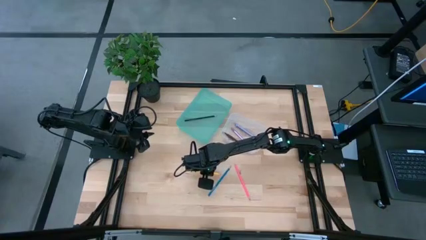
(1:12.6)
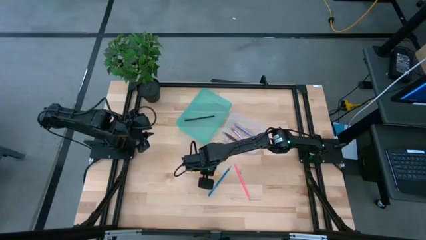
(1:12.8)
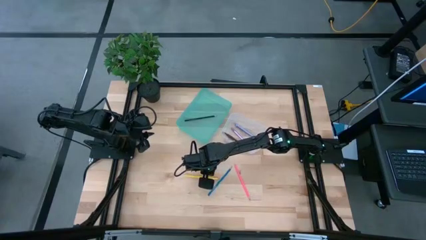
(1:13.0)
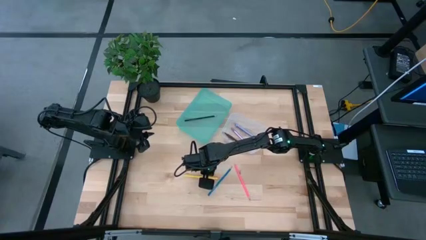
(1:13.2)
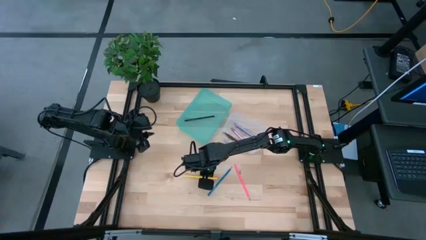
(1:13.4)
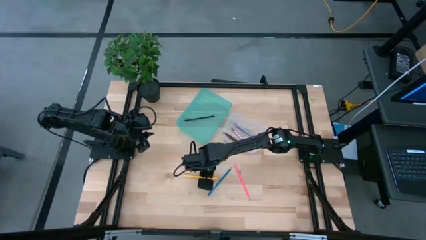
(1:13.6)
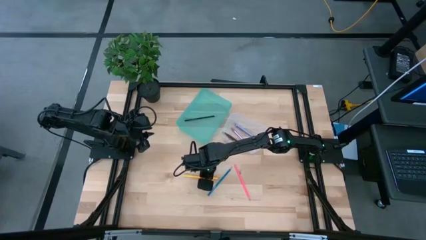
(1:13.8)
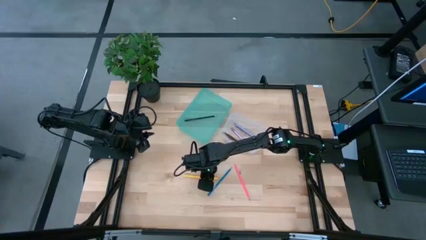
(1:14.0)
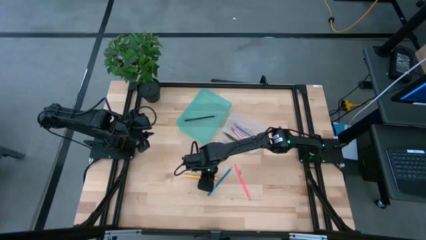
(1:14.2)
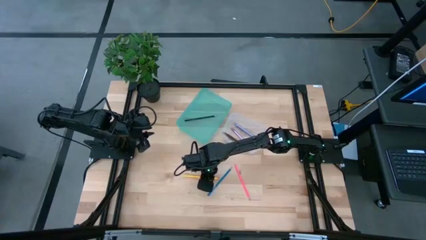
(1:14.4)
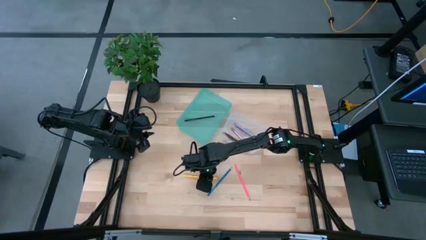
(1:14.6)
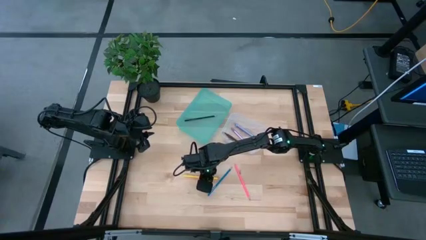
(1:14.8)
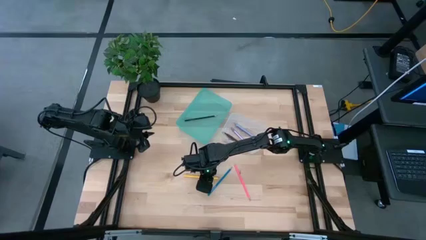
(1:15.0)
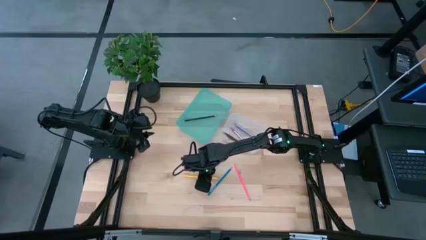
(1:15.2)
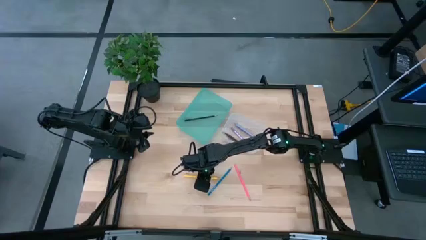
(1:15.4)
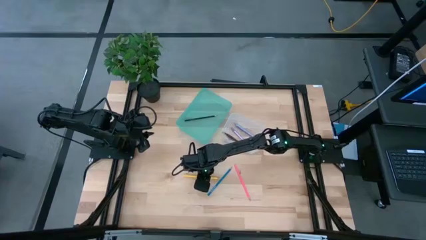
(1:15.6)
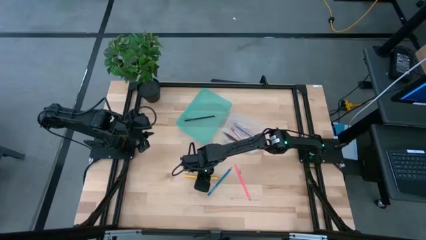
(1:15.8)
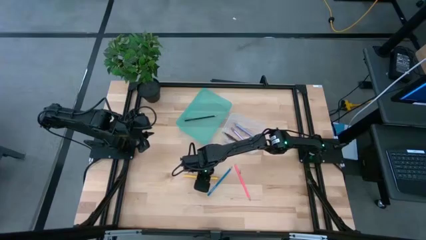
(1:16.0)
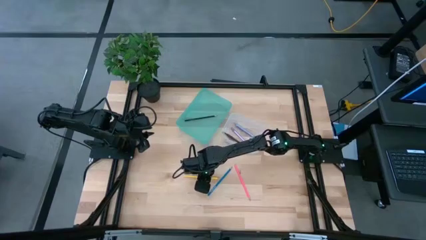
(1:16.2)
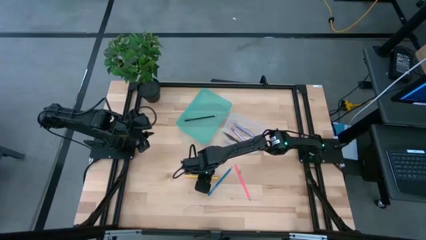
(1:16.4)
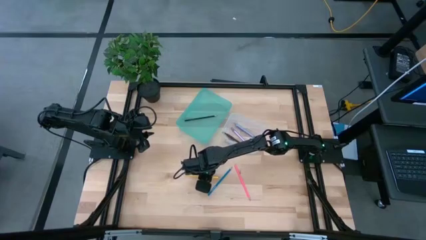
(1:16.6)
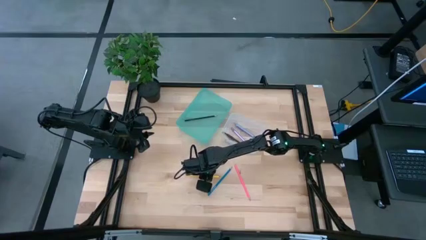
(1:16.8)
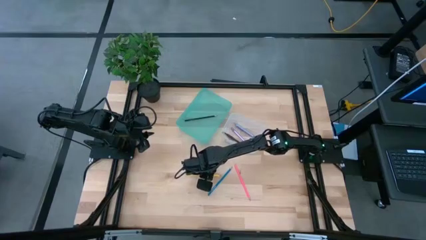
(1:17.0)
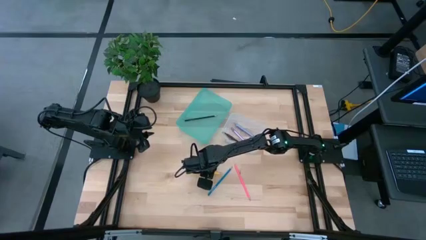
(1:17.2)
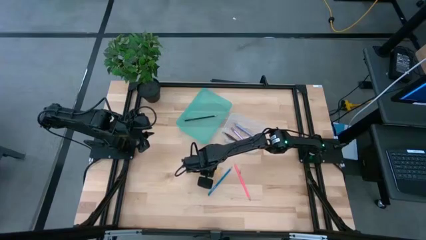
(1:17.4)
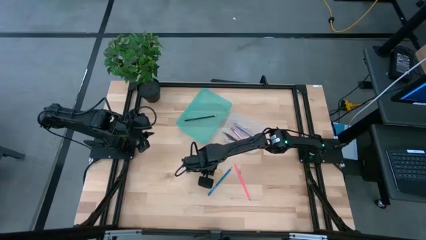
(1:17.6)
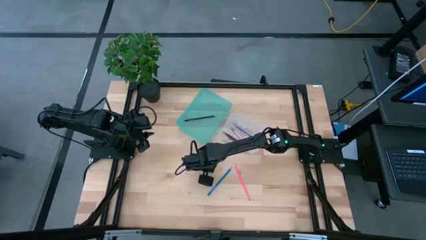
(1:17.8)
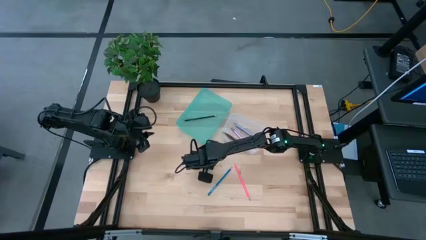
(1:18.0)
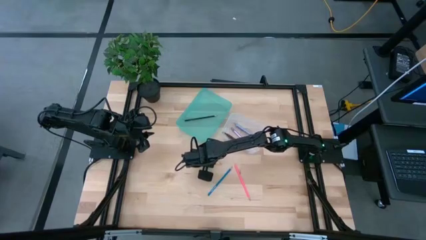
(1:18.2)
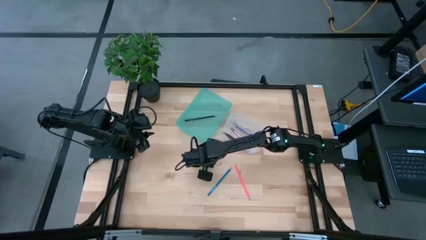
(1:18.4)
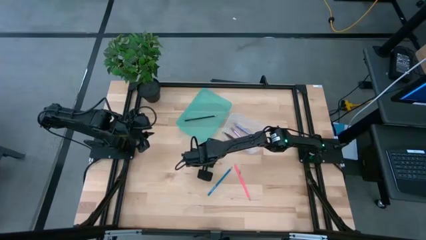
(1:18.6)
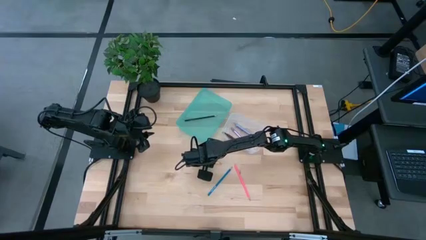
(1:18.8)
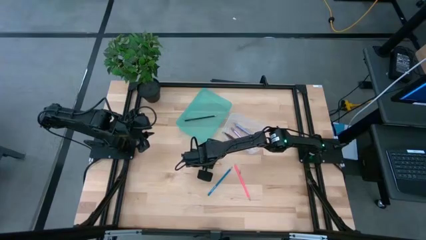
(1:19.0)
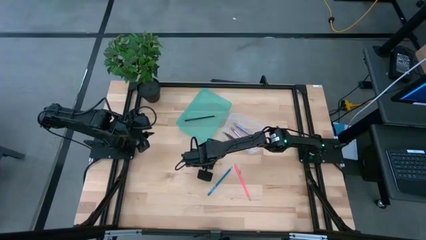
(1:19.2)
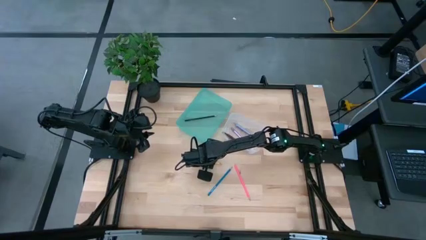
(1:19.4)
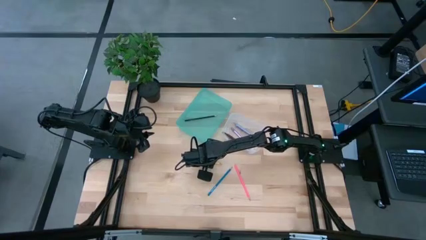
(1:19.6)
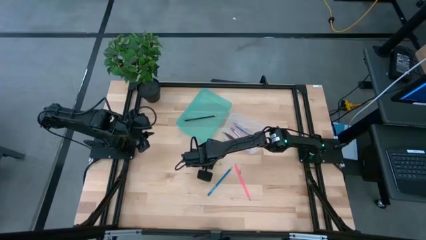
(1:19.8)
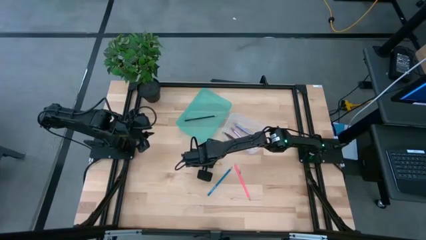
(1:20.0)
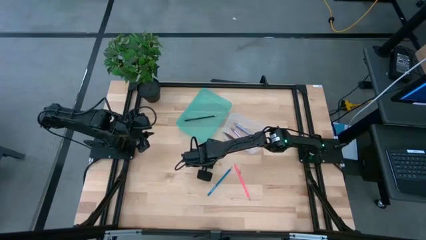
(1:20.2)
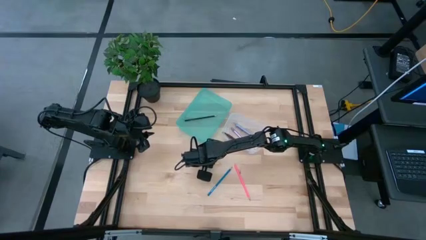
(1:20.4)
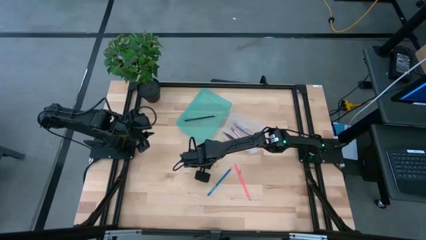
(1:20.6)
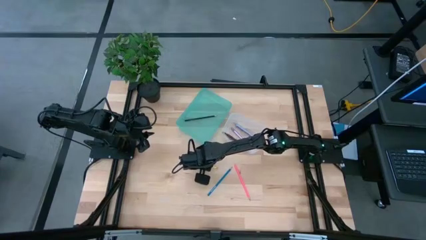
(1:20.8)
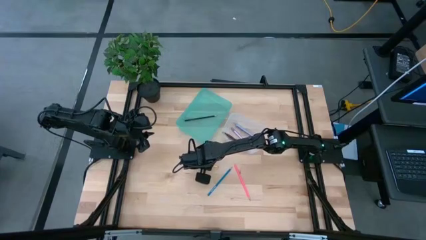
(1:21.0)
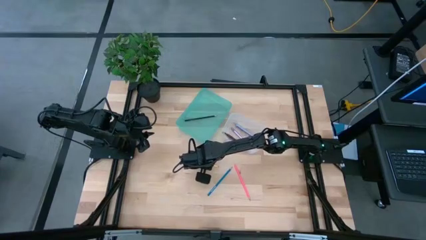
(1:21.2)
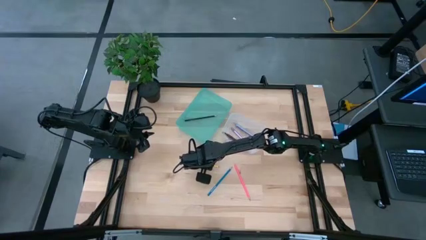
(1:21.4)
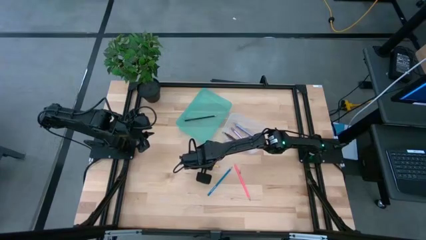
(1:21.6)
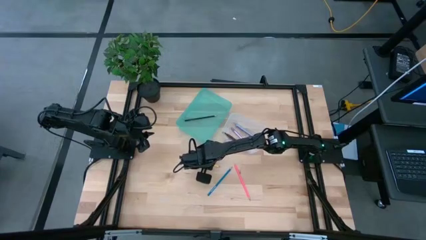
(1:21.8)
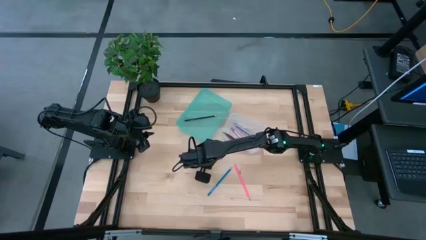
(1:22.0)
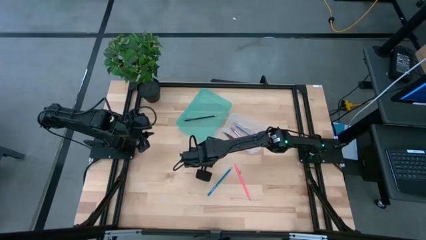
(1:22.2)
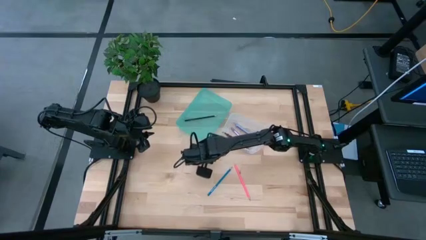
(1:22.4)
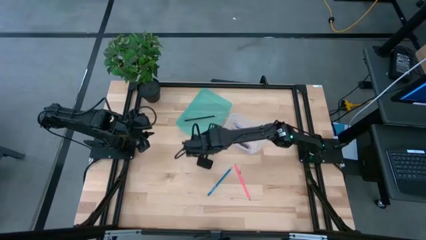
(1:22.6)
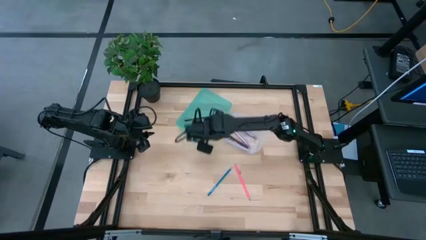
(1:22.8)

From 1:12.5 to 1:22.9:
Task: Sort pens & pencils
Put the yellow pencil into the blue bin

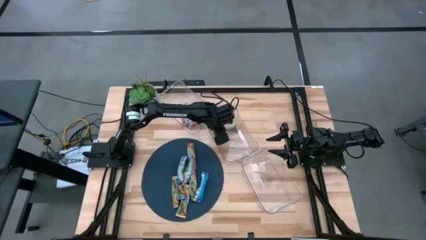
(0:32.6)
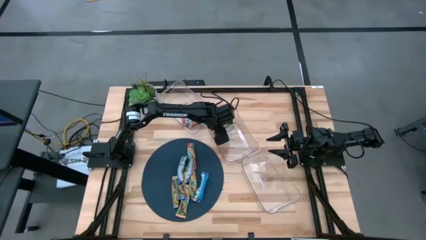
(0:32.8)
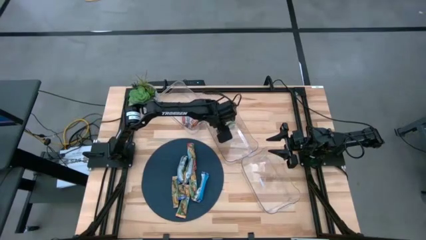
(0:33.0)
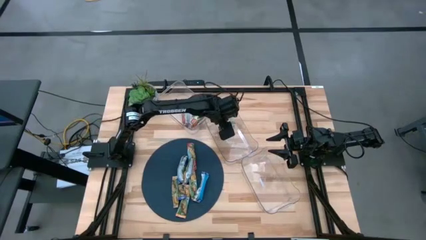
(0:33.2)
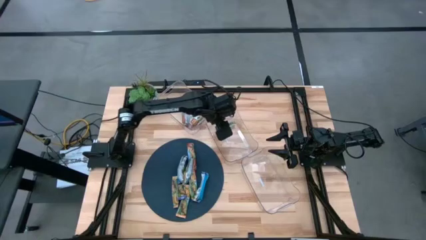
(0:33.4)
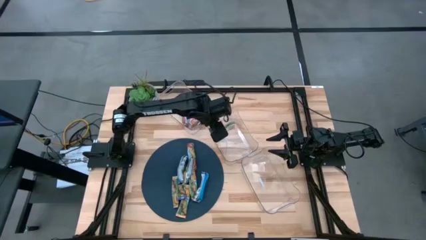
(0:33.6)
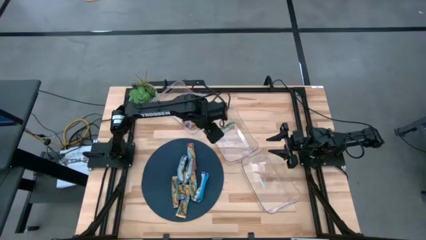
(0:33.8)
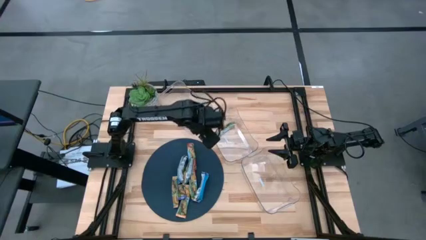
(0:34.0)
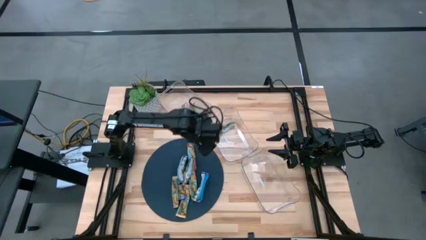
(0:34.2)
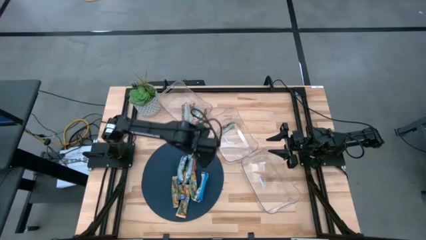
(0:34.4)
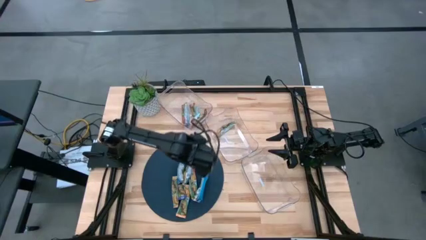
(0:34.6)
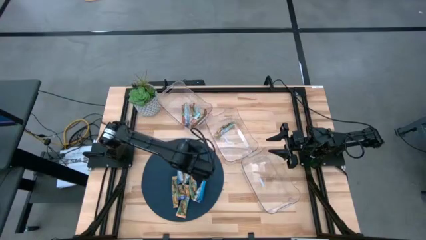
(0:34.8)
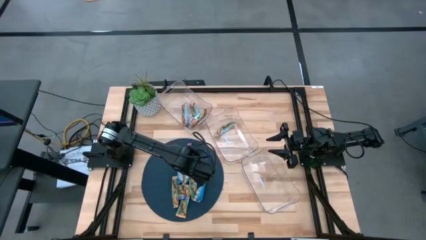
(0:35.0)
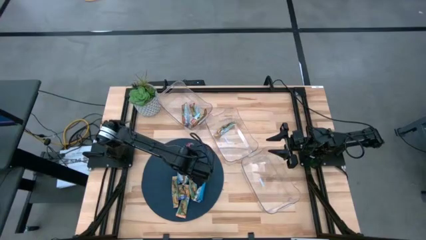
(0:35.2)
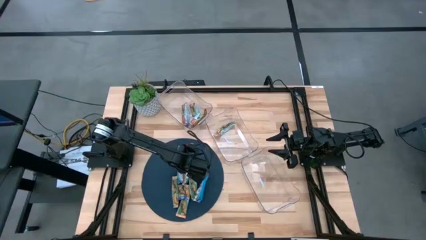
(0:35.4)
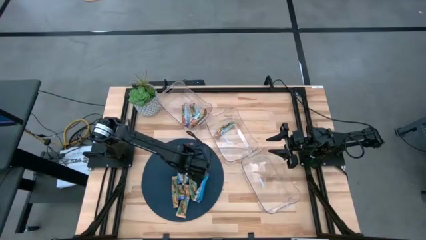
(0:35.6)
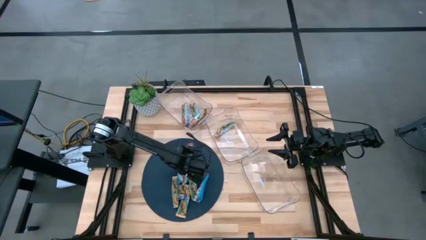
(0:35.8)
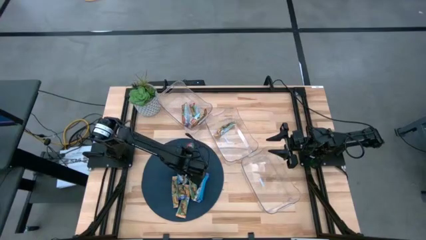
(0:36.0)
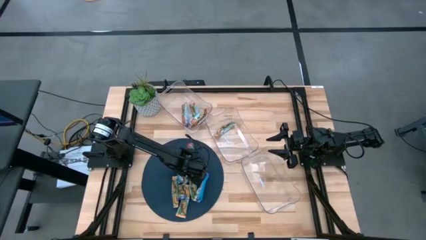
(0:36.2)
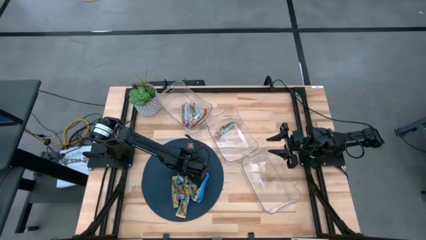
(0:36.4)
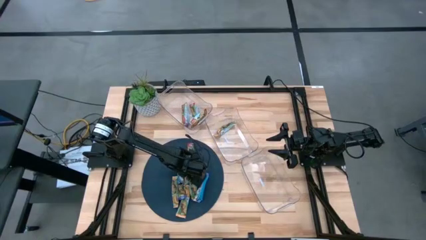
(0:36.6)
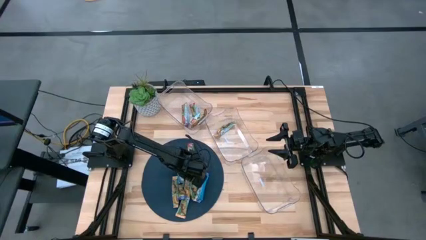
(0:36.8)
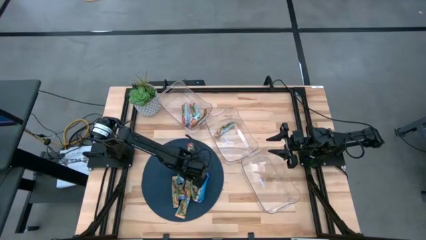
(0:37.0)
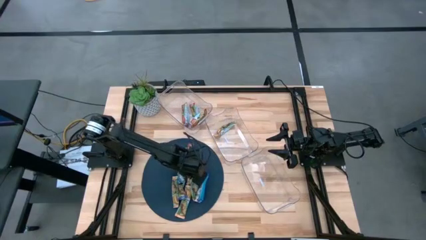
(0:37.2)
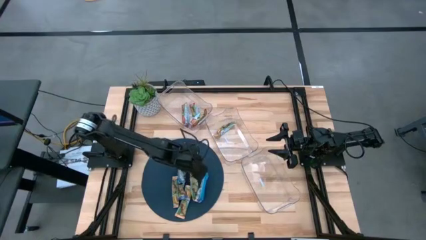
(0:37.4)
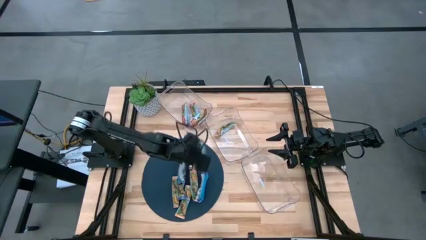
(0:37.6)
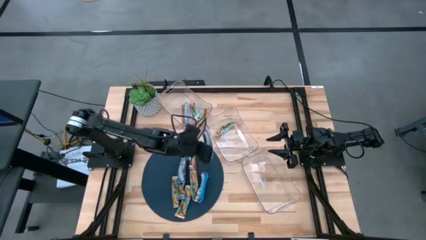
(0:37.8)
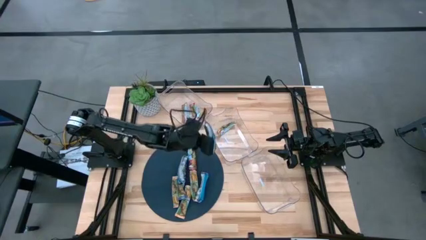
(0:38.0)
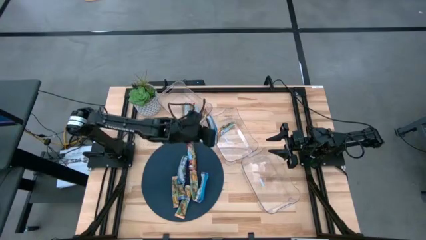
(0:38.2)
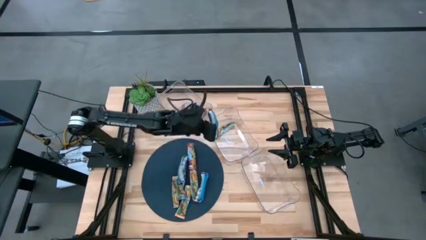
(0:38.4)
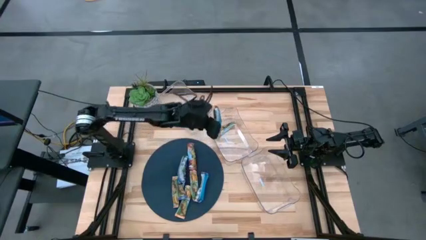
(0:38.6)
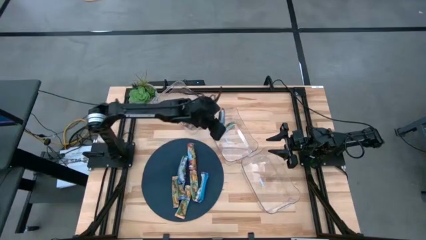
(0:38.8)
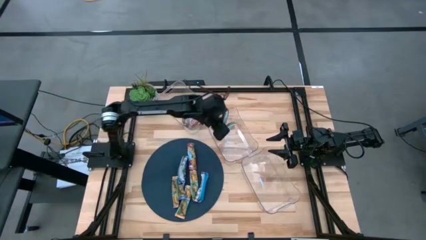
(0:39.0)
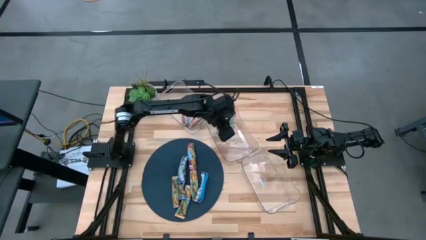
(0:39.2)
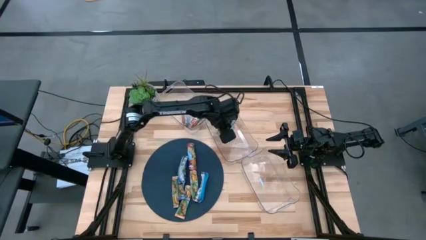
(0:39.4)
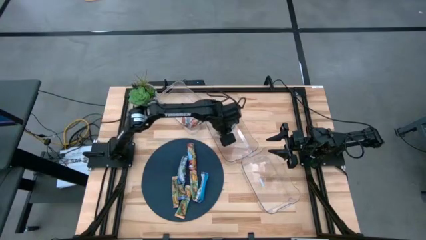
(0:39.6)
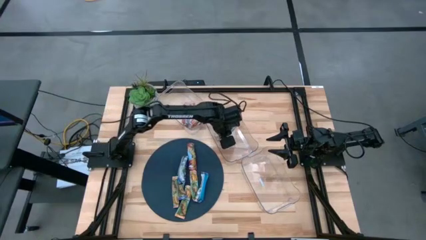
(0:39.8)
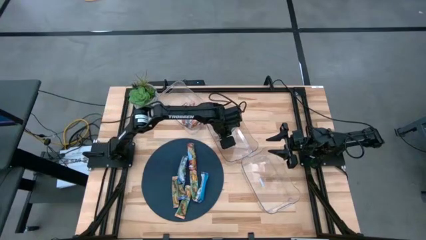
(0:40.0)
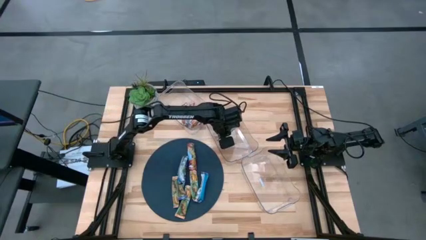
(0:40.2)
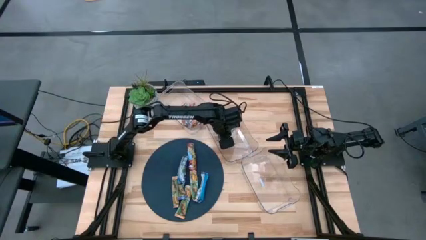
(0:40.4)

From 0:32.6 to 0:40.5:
Task: Pick and place Granola Bars by type
Put the yellow granola bar into the middle transparent bin
